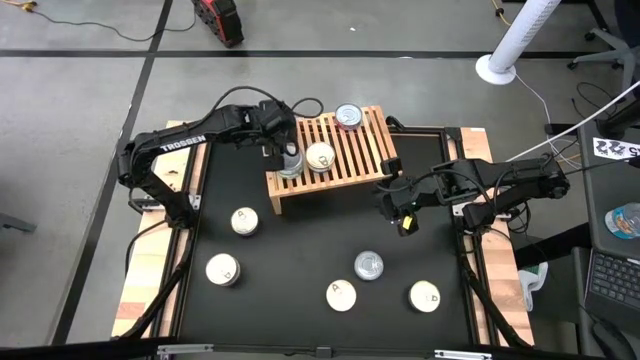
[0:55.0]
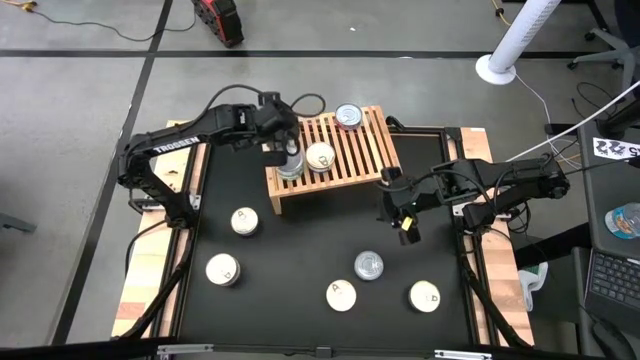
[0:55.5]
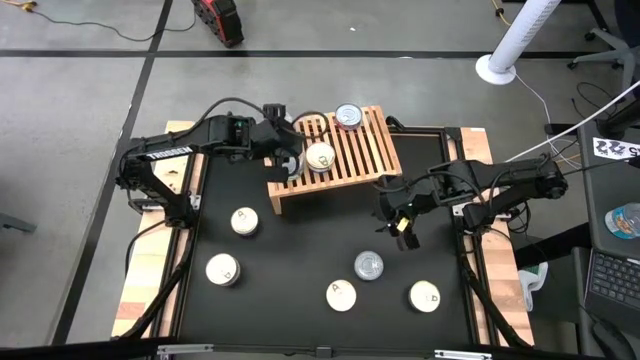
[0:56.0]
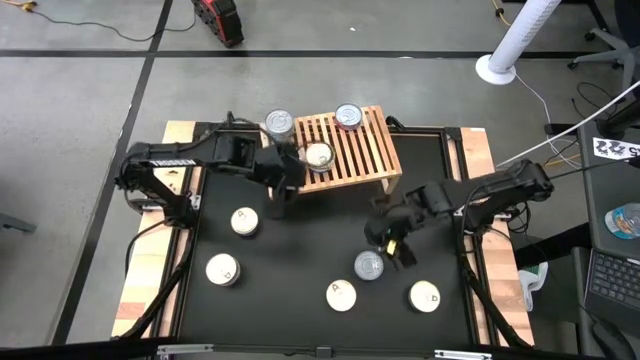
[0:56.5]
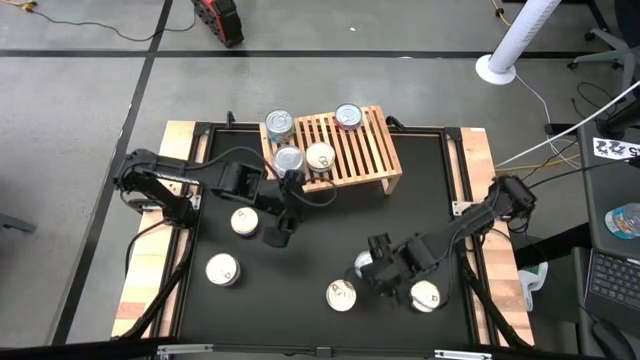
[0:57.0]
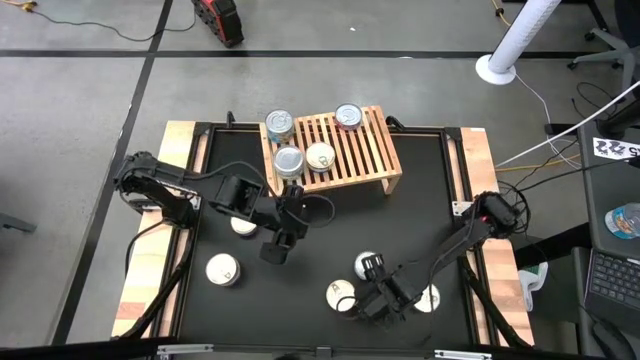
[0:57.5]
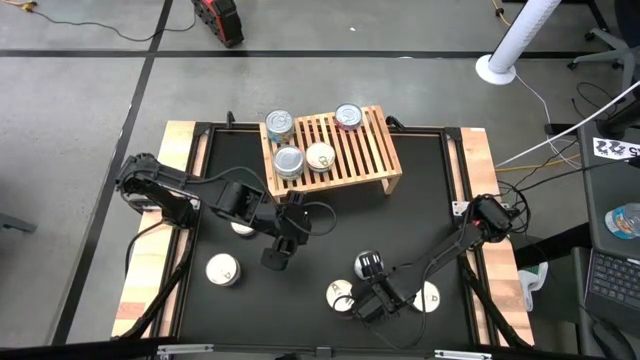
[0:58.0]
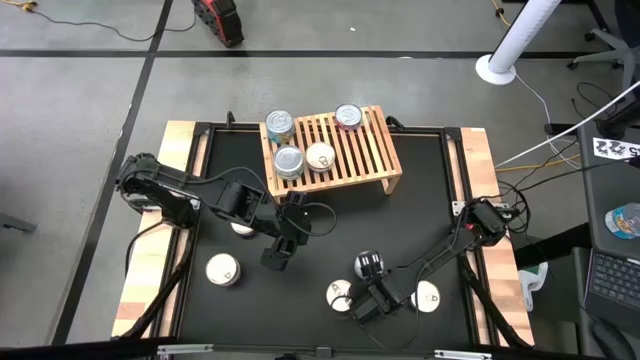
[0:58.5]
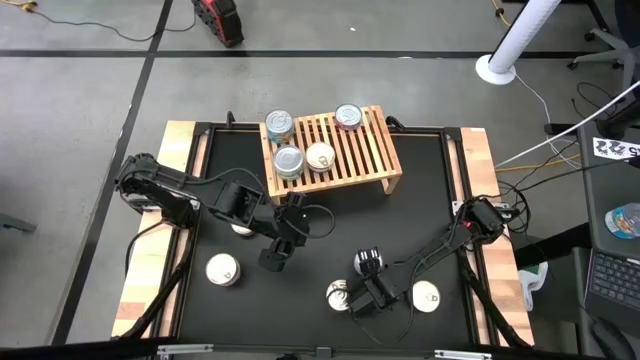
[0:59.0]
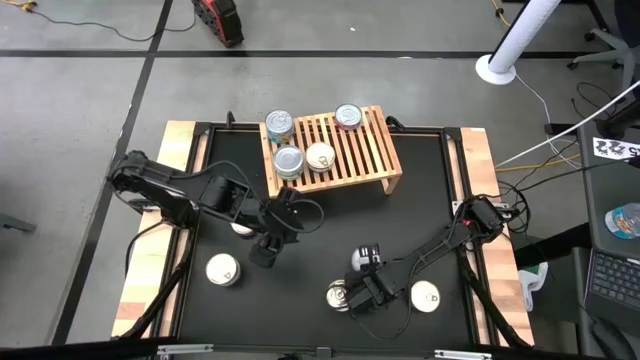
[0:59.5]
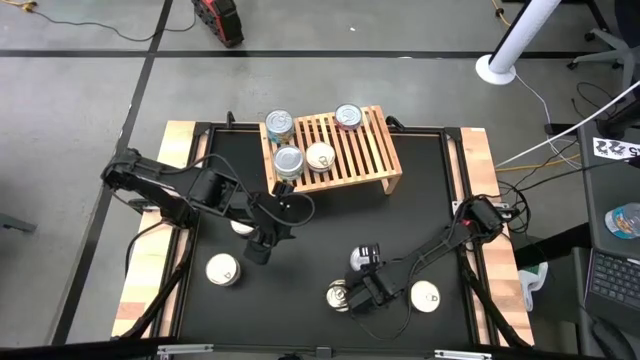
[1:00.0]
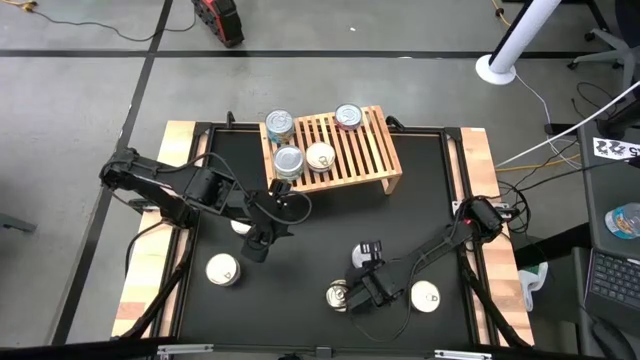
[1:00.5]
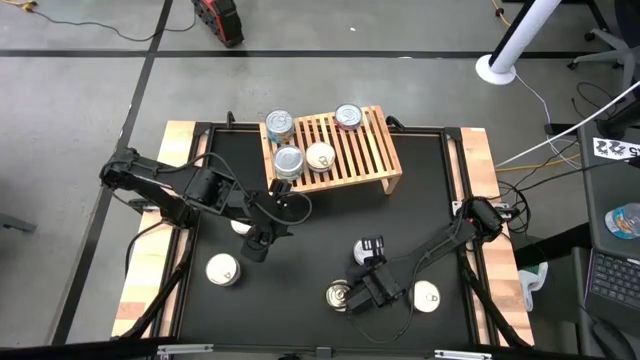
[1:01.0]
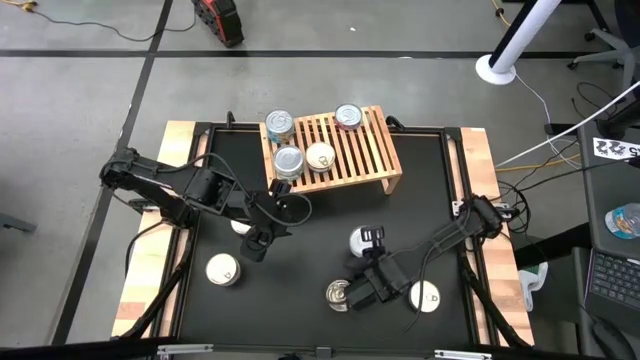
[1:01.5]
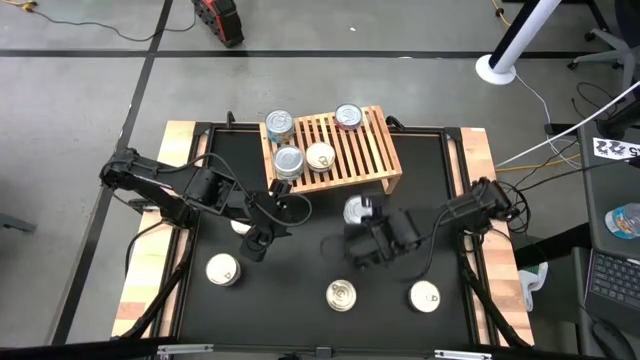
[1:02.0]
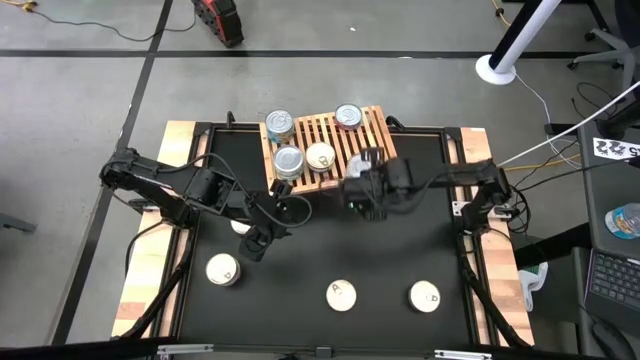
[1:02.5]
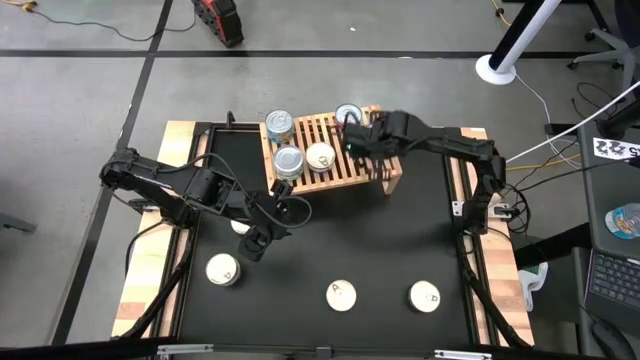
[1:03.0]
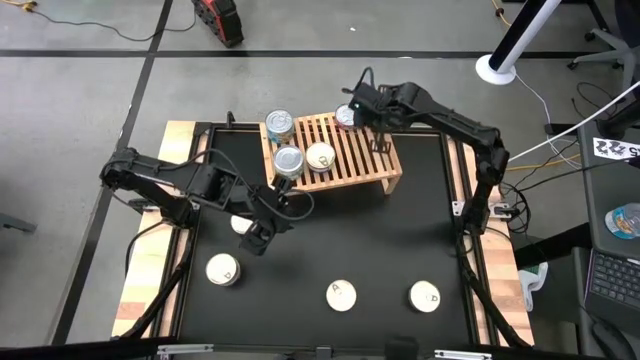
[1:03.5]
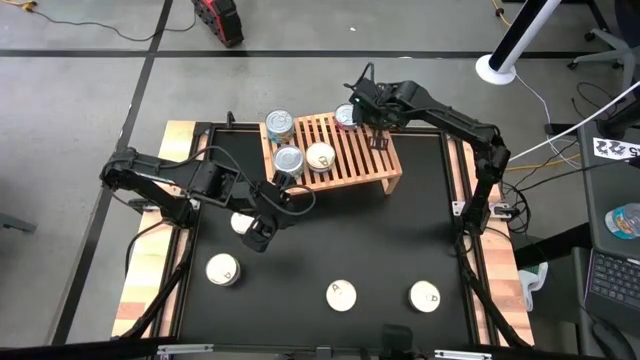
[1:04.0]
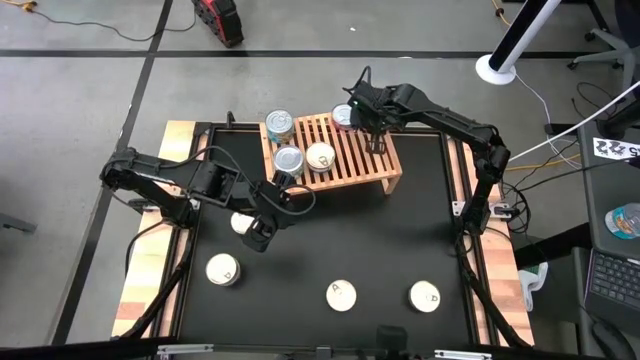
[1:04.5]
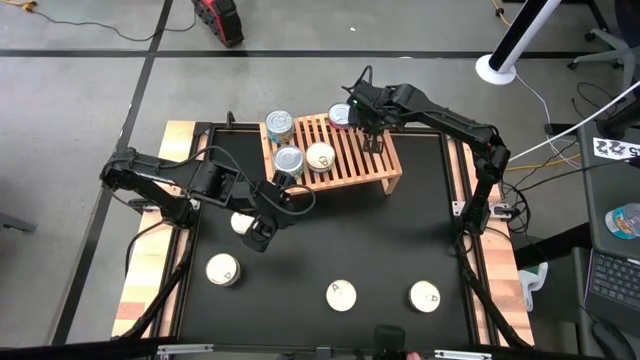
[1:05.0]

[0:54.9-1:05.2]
Task: Stack canned seafood by type on shelf
Put the green and white tuna can on the shelf

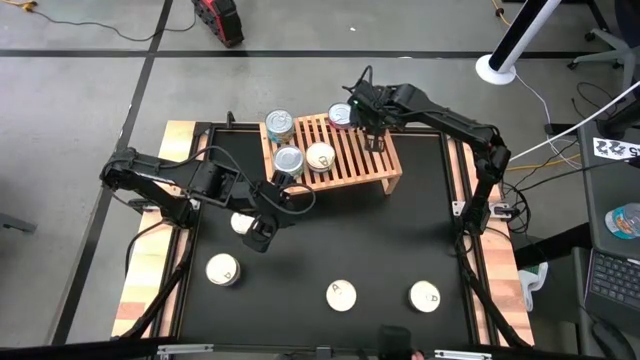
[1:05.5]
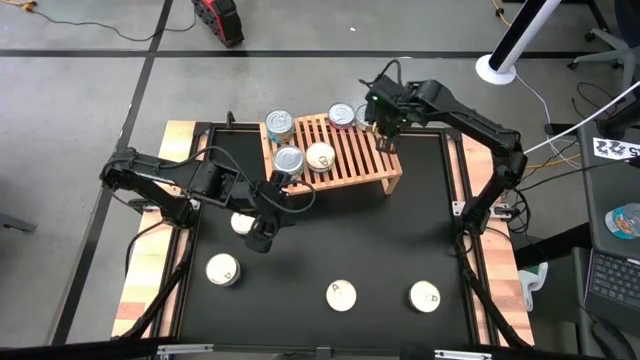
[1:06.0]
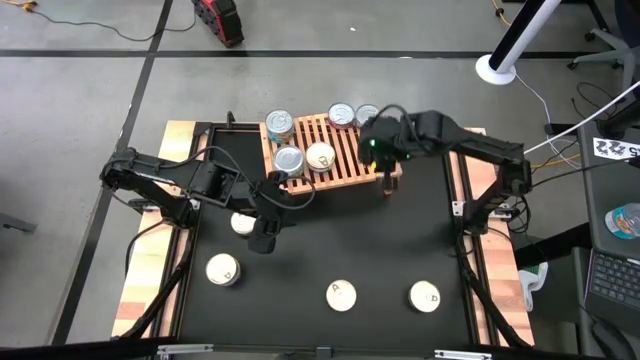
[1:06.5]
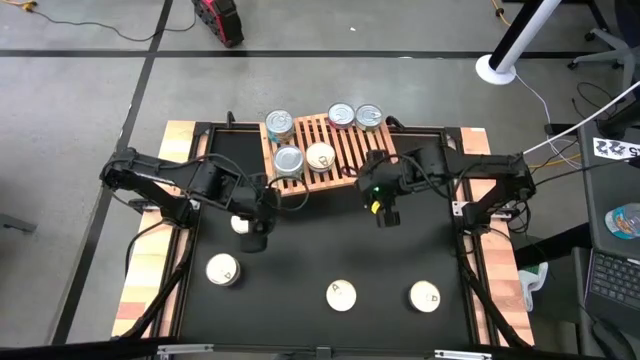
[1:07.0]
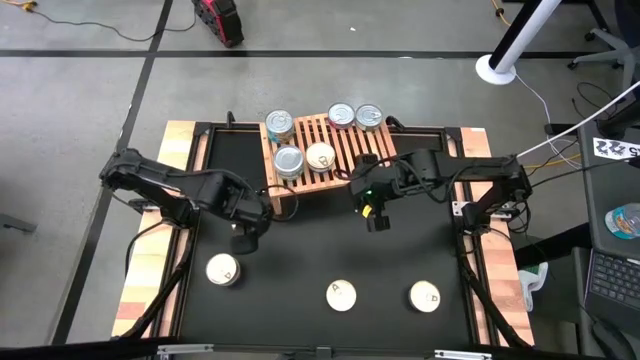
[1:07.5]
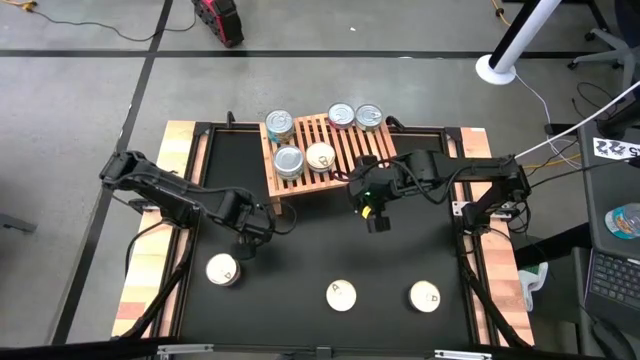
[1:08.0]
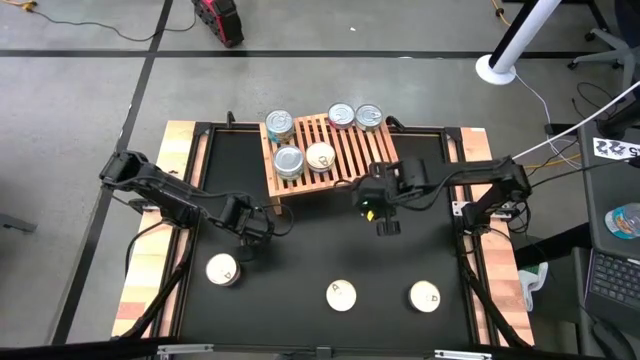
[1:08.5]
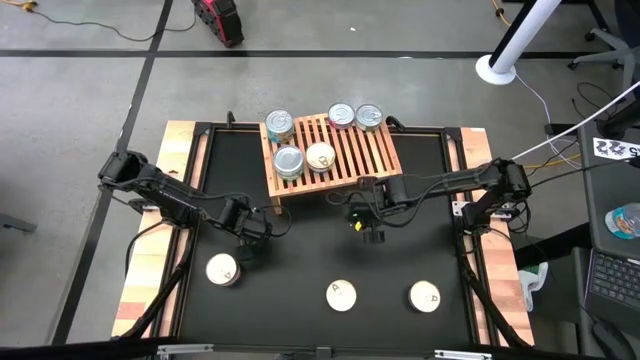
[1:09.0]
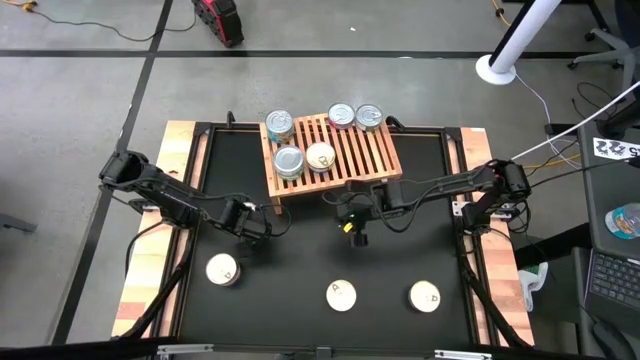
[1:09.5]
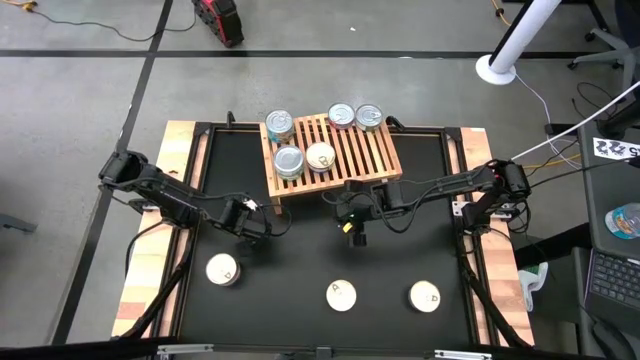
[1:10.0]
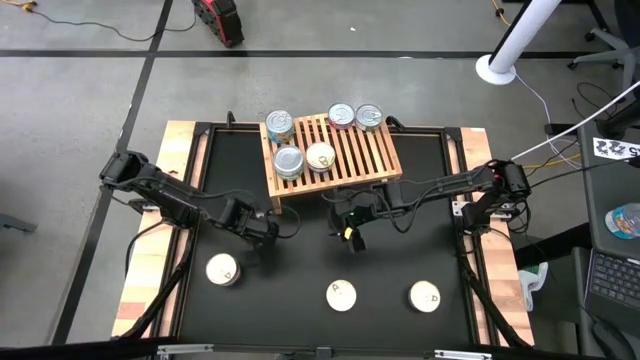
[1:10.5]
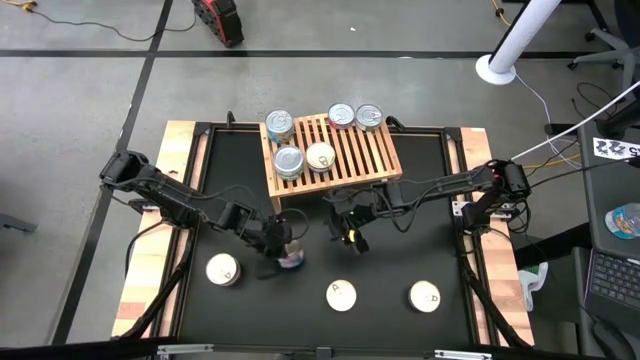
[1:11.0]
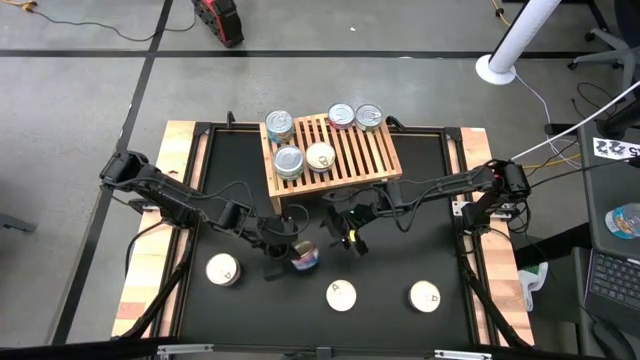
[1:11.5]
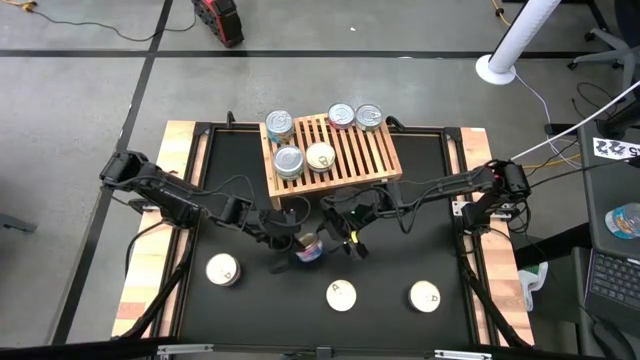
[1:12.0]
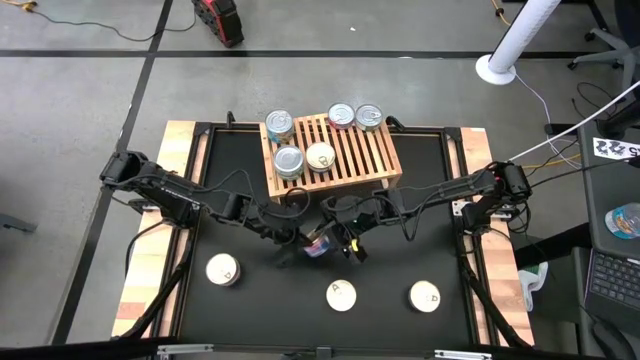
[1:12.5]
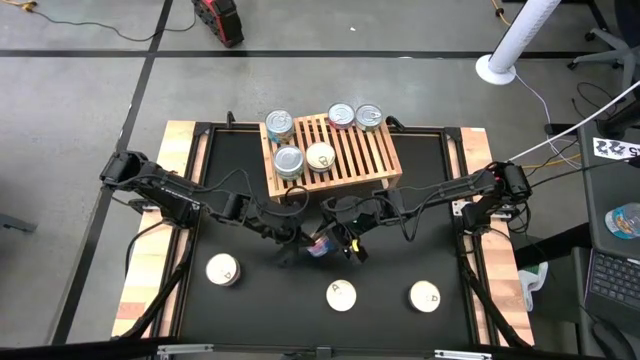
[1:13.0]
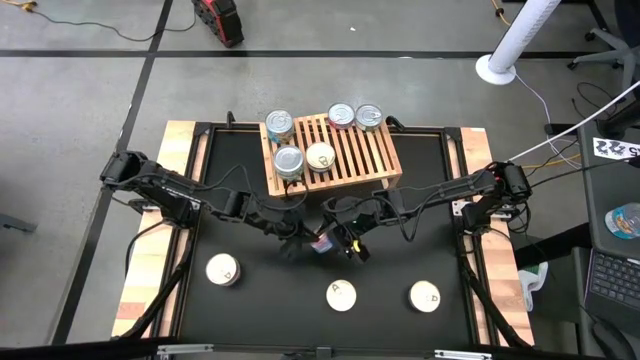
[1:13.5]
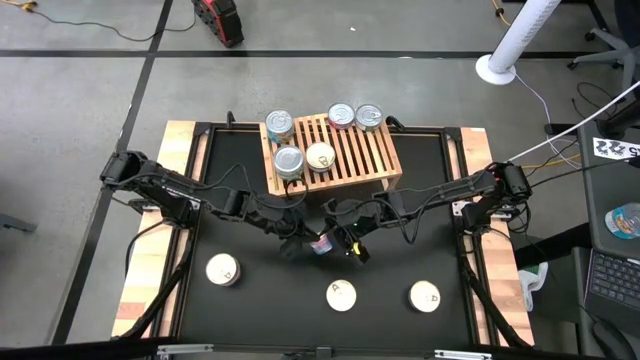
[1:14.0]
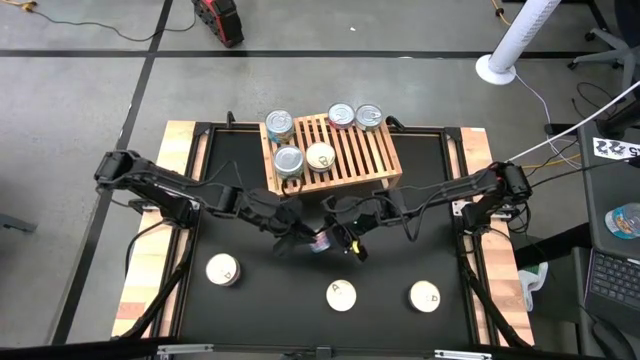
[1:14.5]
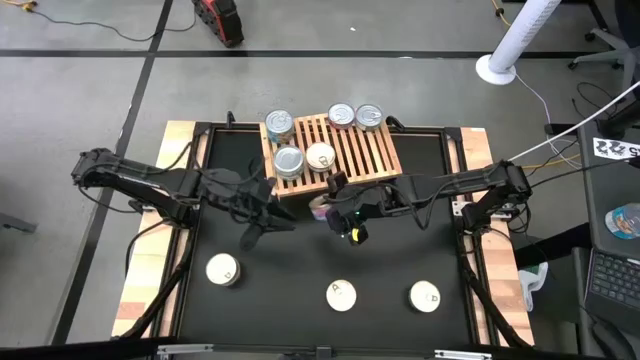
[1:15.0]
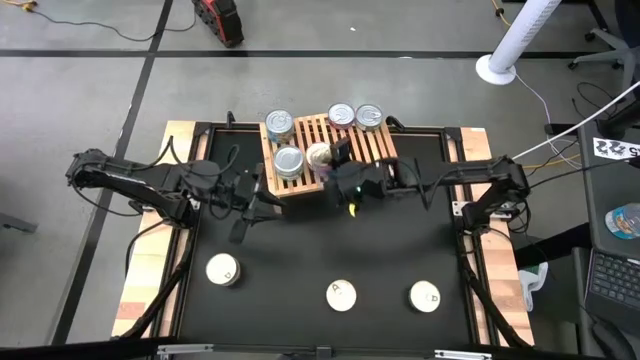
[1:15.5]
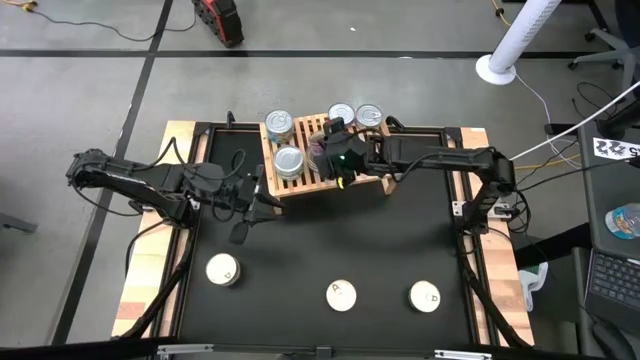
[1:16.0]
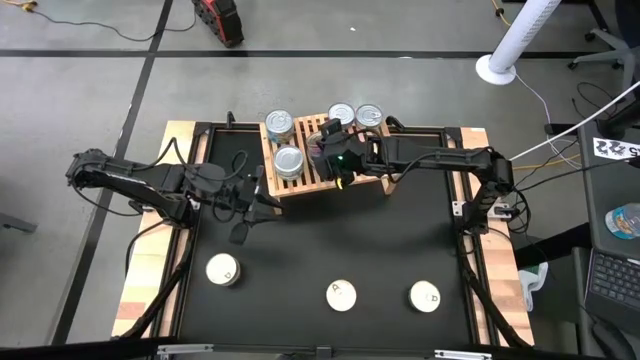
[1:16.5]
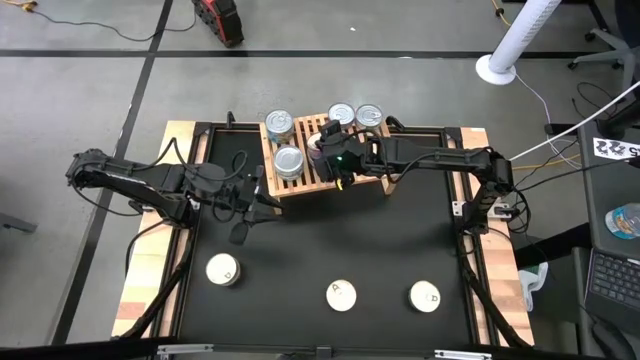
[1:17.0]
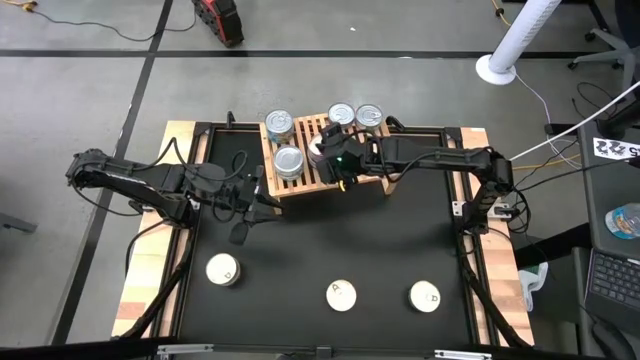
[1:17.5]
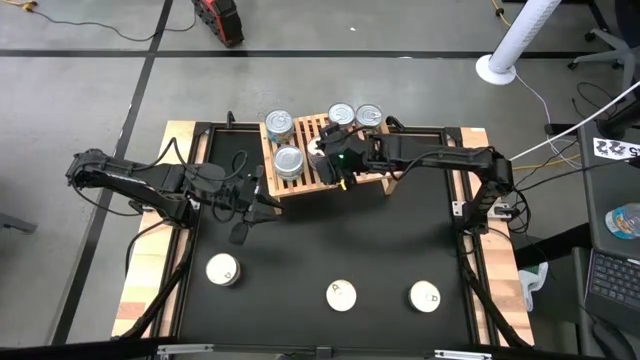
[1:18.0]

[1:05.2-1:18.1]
Put the blue tuna can on the shelf
